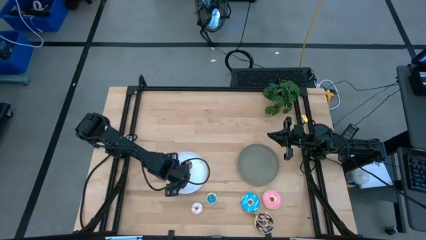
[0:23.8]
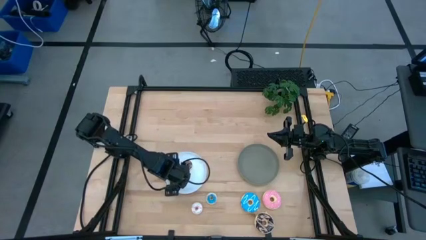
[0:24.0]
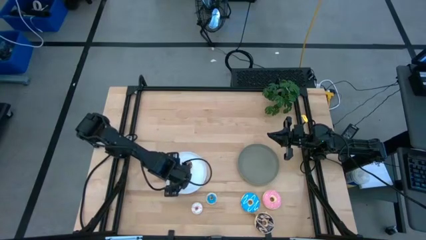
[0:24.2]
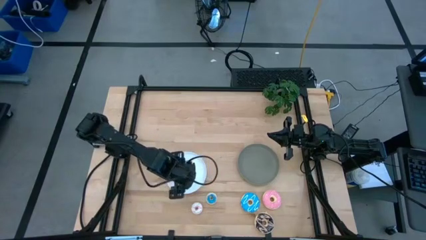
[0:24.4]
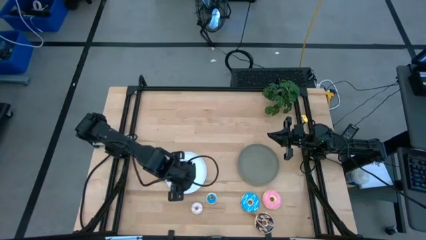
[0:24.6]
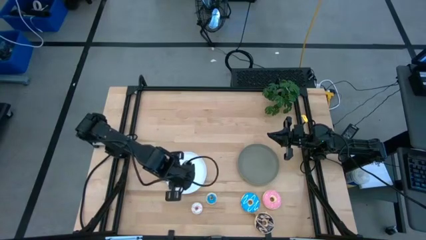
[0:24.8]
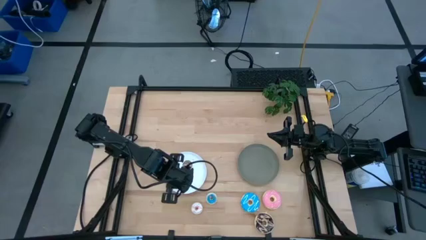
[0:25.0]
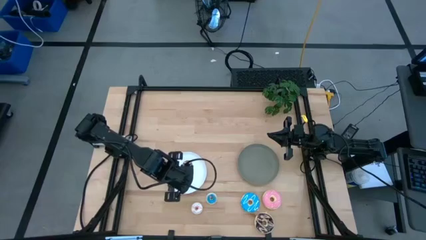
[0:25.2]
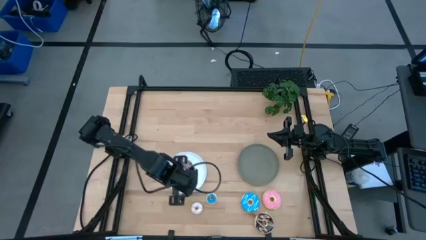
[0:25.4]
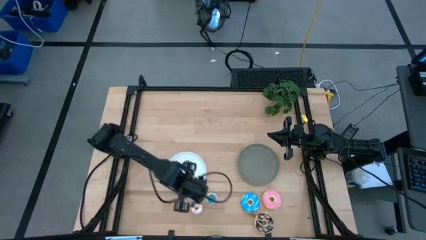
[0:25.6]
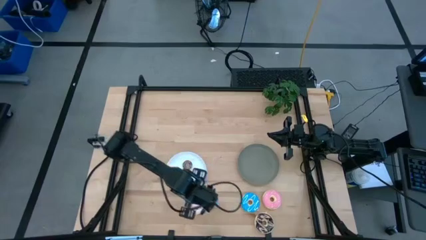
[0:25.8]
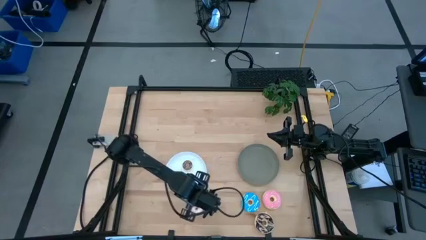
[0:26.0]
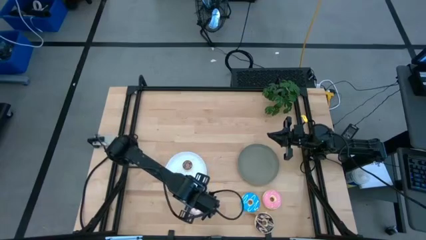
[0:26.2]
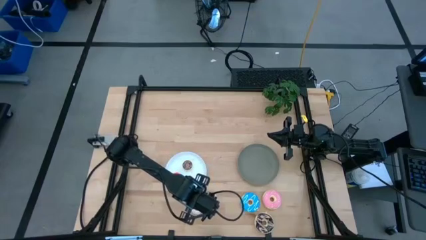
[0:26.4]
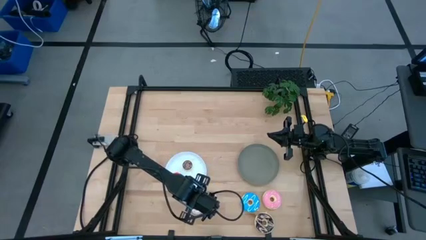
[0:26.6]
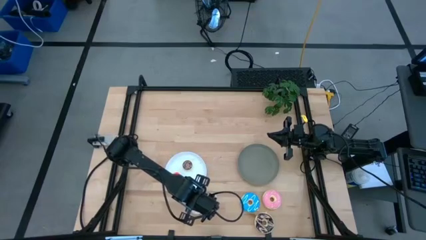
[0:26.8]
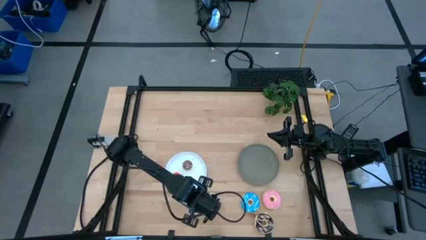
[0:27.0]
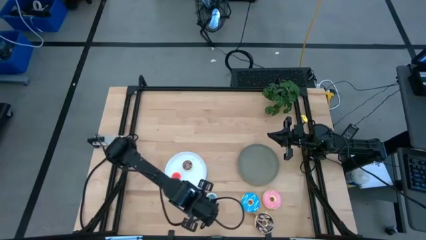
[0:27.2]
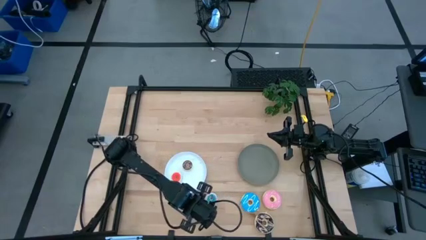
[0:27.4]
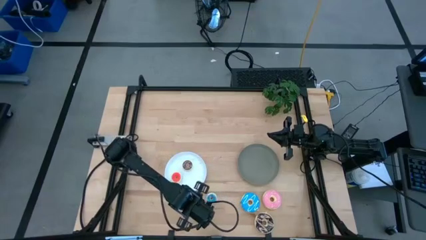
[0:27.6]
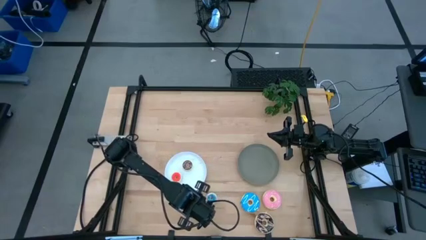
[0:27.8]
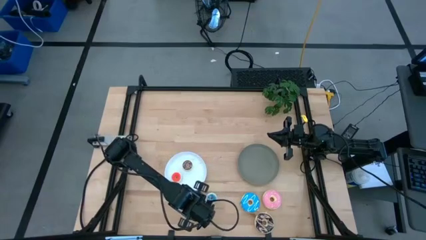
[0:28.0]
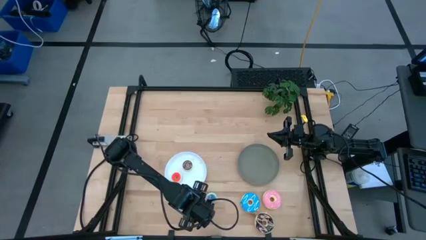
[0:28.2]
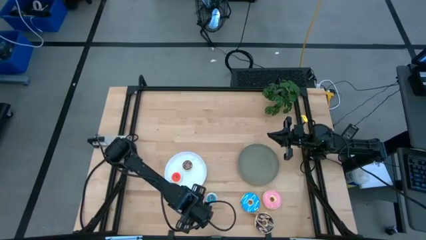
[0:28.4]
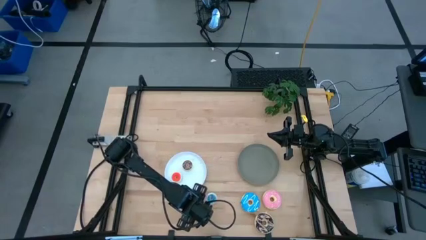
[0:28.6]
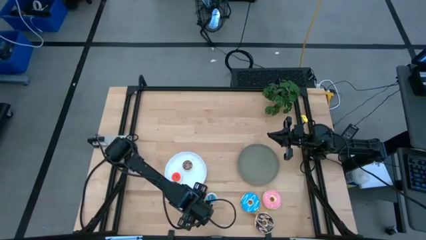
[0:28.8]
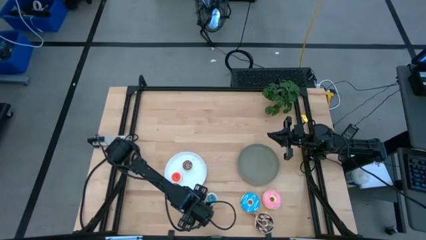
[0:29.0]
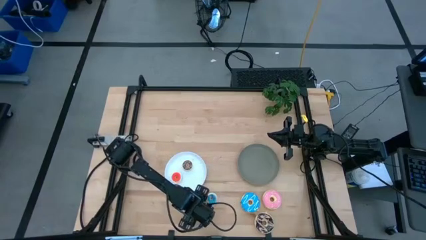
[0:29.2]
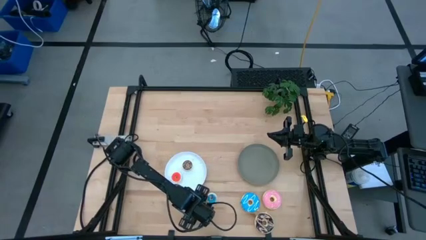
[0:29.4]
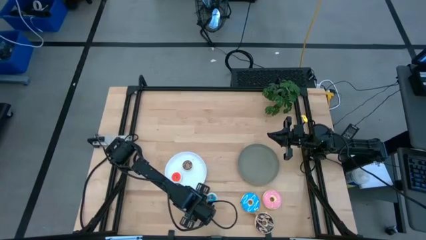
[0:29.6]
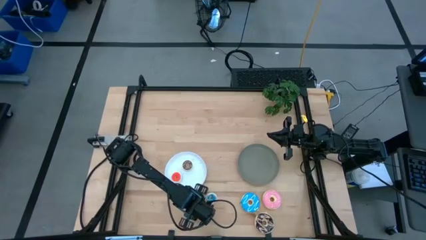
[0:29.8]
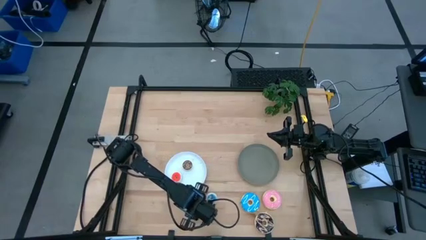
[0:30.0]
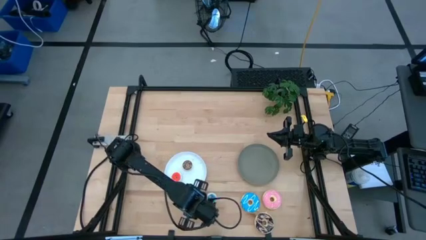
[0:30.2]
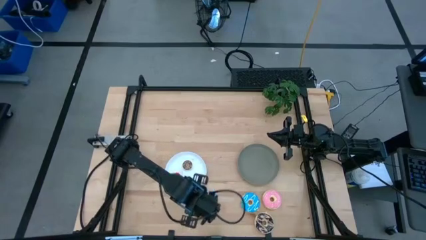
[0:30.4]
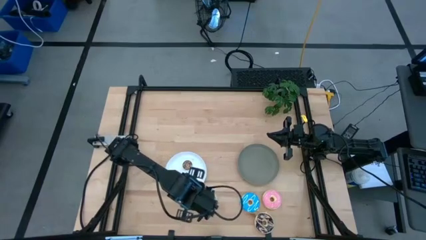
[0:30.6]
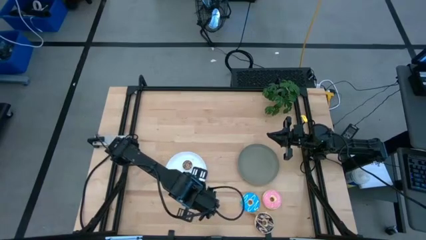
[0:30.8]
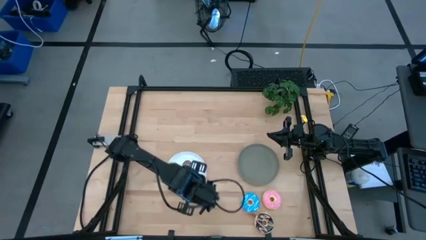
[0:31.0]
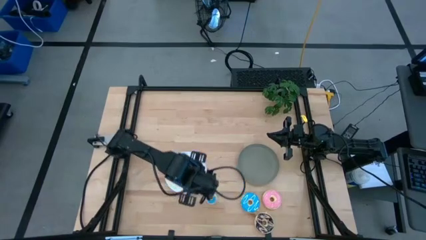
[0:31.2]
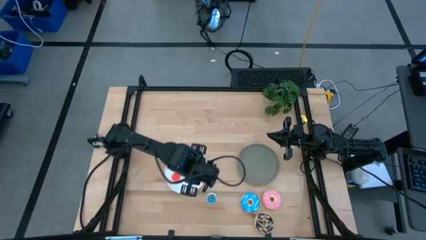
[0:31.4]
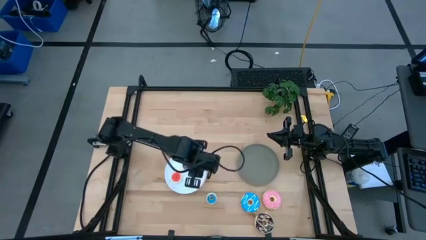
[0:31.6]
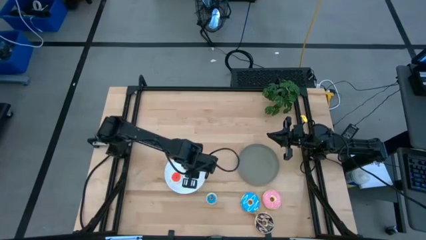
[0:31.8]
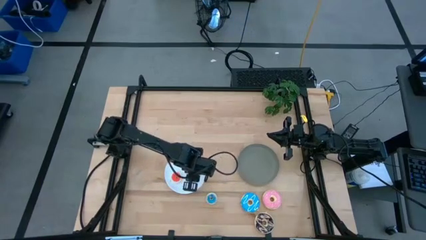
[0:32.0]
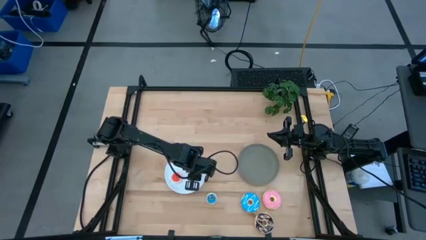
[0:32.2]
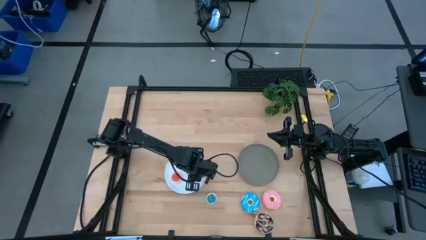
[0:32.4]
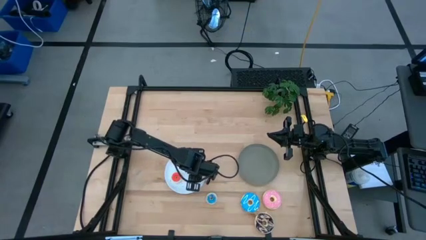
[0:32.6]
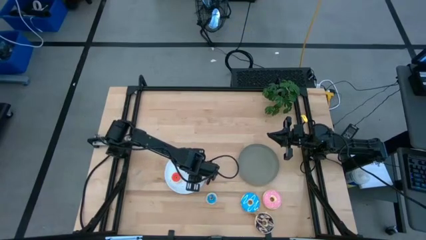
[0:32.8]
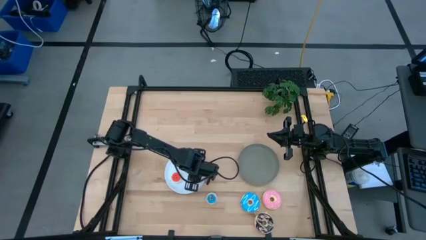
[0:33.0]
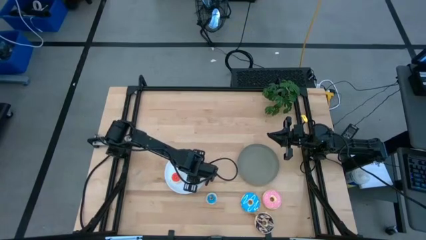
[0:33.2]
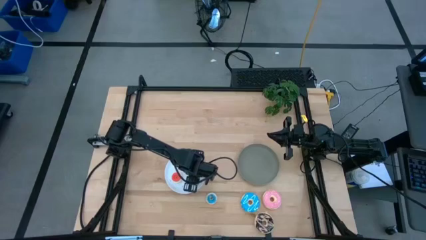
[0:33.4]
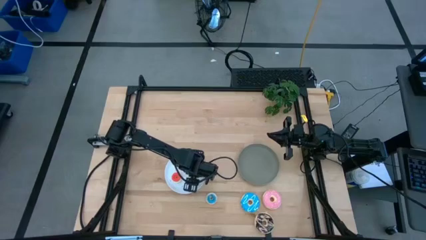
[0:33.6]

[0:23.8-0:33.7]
Task: Pick & Place donuts
Put the small white donut on the white plate

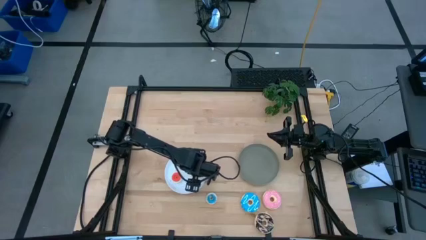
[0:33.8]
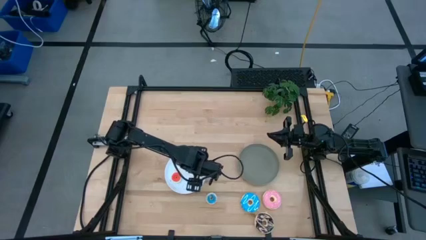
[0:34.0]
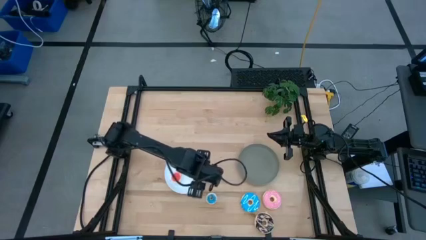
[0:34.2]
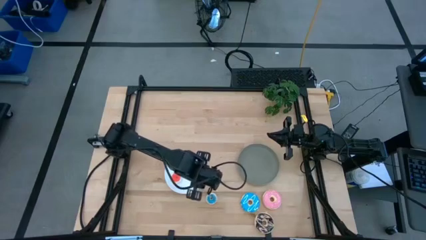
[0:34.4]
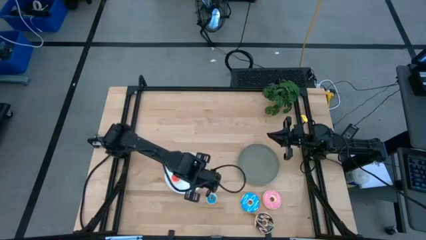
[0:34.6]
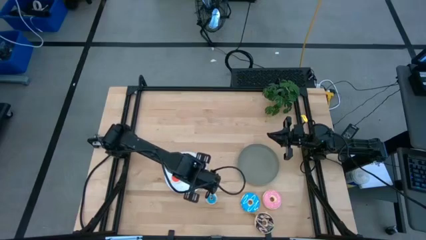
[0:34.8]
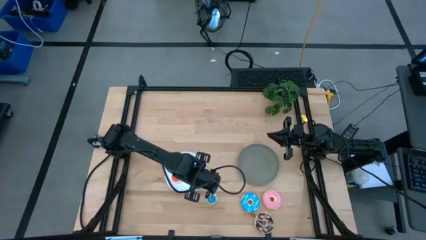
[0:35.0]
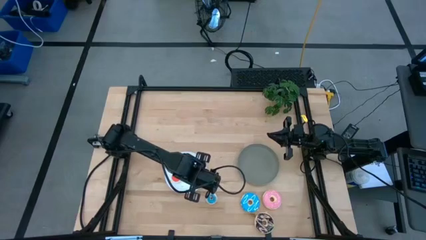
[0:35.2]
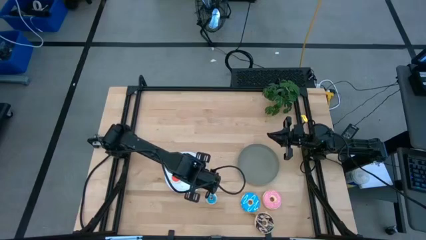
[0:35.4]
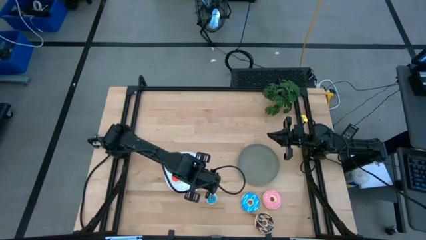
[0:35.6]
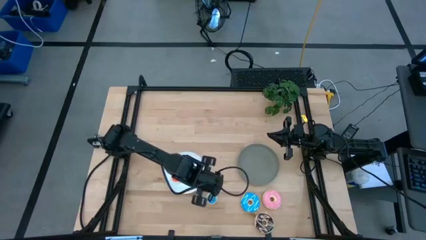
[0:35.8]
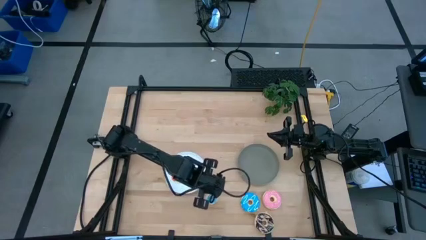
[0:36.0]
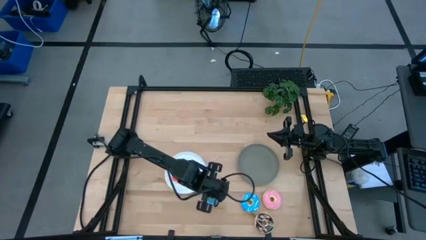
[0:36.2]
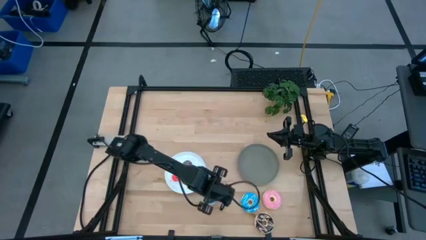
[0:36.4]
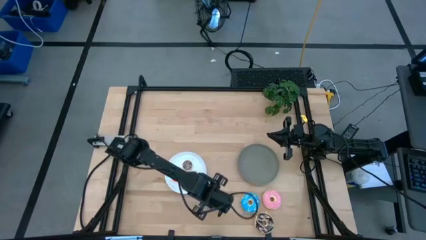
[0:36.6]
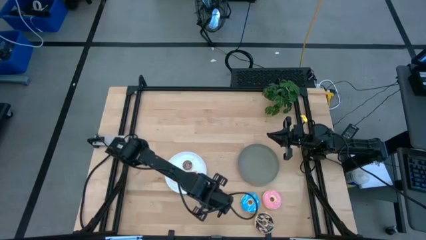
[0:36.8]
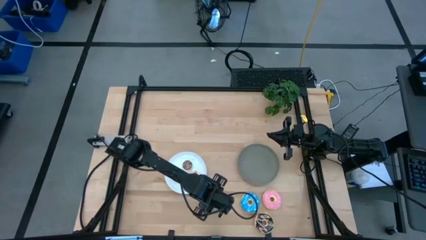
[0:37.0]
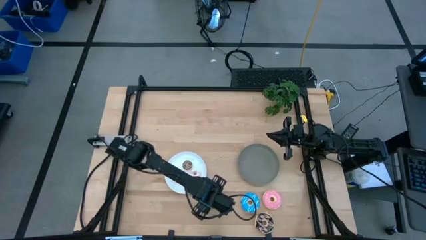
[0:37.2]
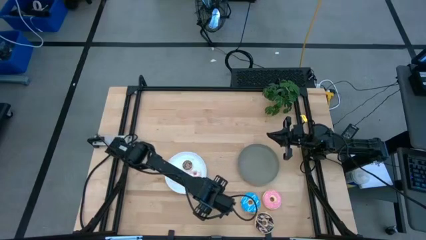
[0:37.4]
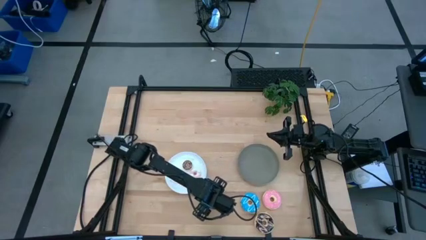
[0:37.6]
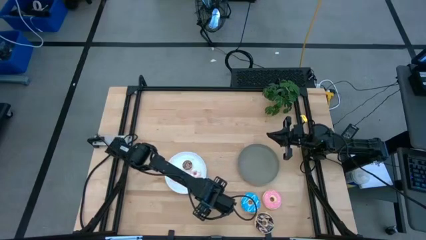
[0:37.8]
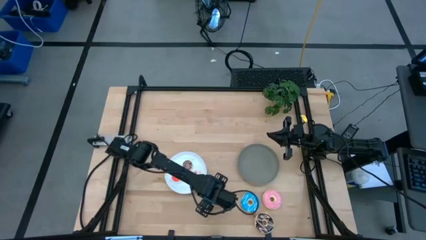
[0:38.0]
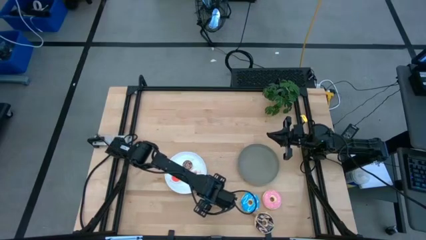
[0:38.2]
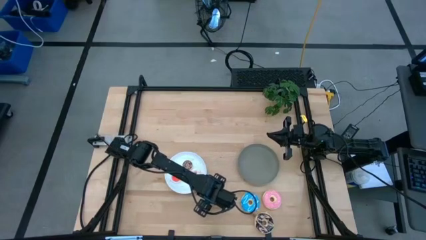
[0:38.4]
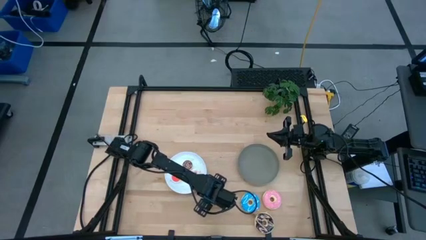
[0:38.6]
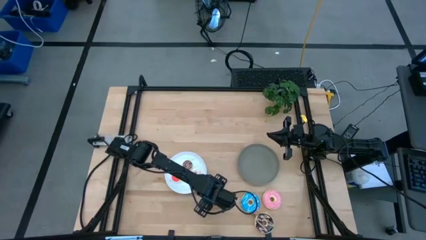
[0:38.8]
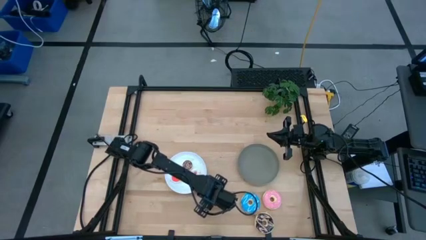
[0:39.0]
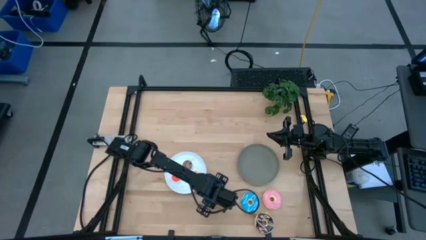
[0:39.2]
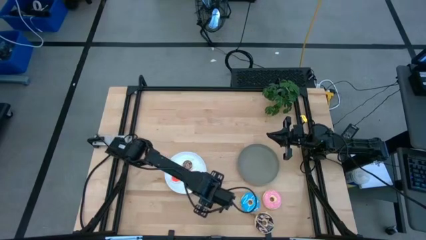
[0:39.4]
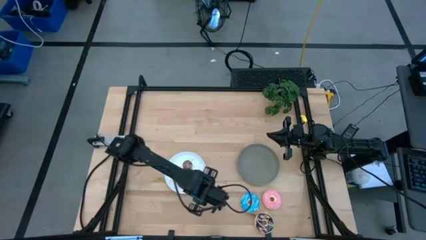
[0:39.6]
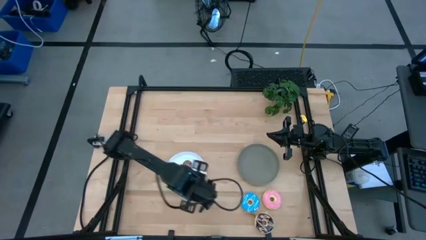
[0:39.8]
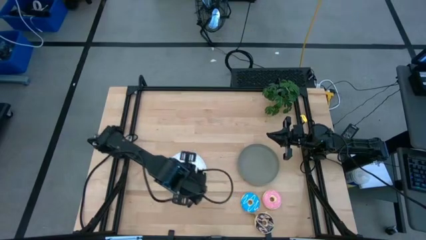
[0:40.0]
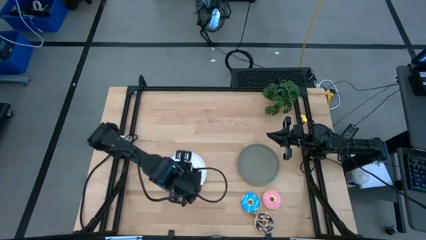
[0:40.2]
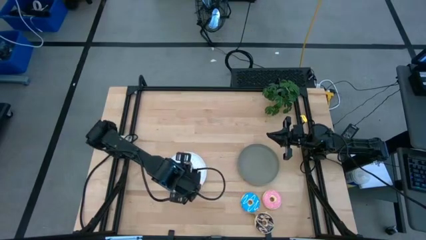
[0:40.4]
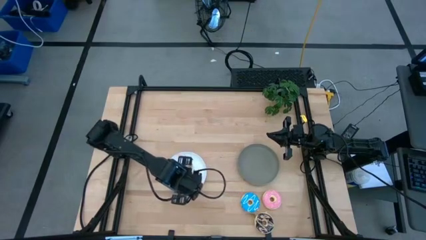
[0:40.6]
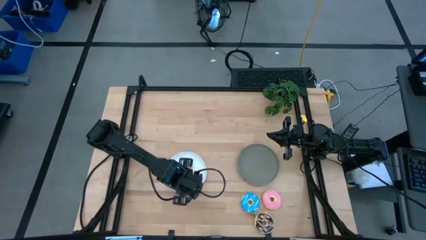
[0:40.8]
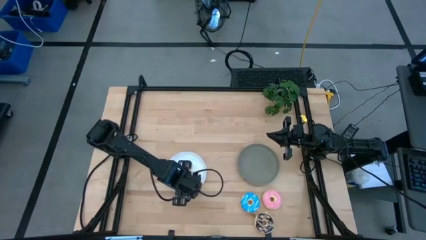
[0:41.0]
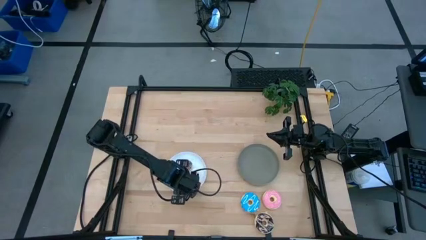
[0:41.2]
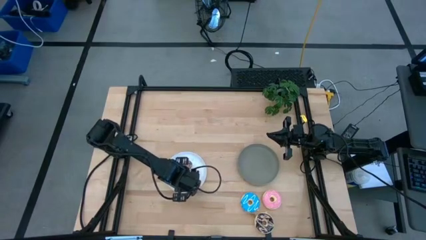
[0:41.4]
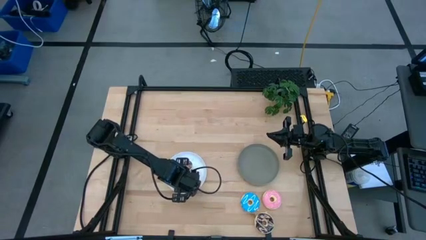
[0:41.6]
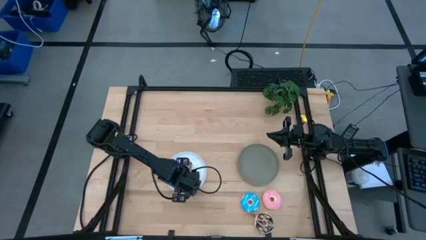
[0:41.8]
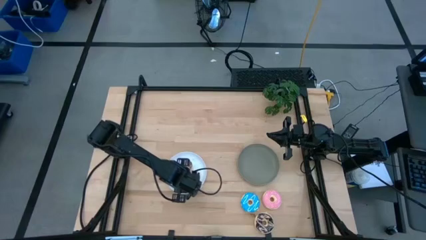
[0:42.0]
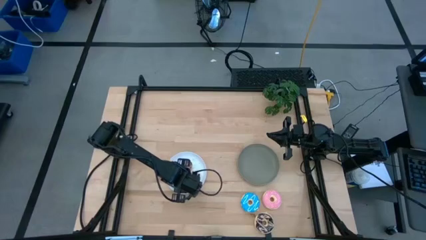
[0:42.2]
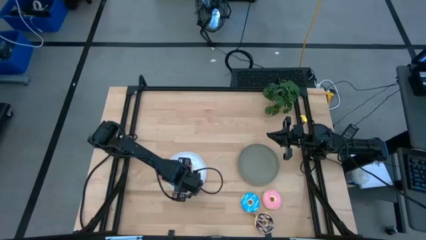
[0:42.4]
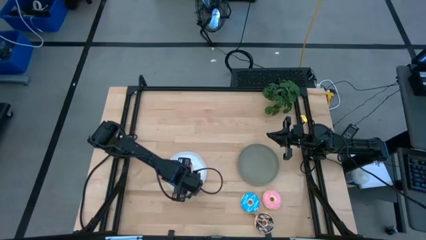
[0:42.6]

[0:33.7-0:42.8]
Put the small blue donut on the white plate
